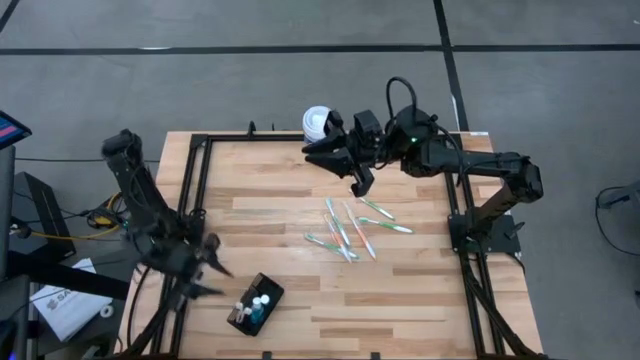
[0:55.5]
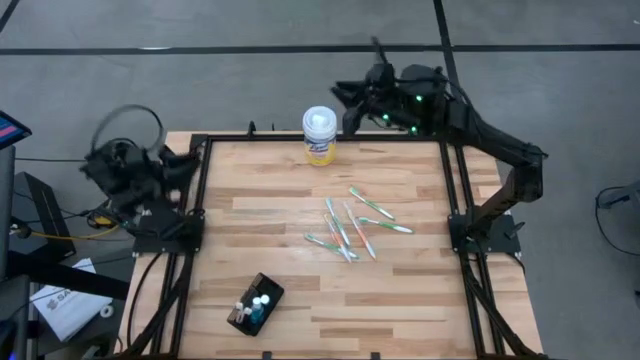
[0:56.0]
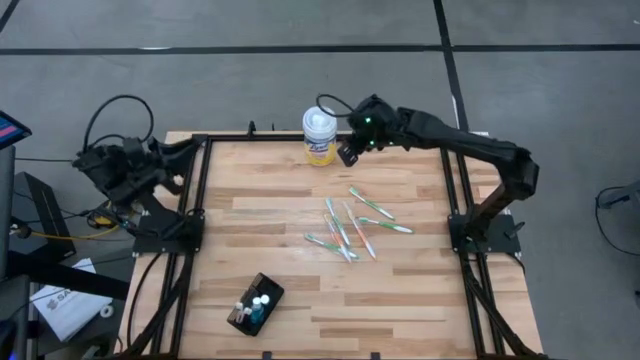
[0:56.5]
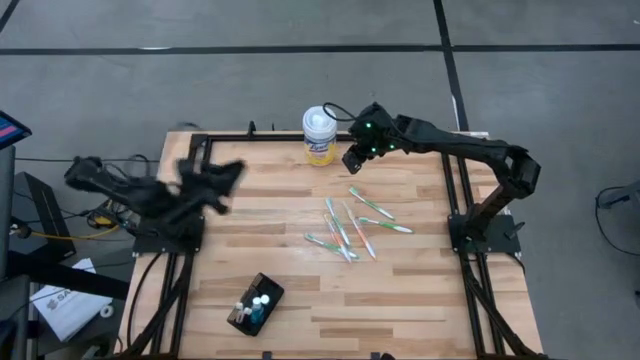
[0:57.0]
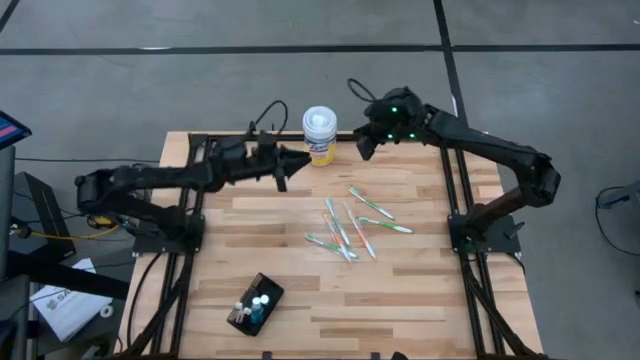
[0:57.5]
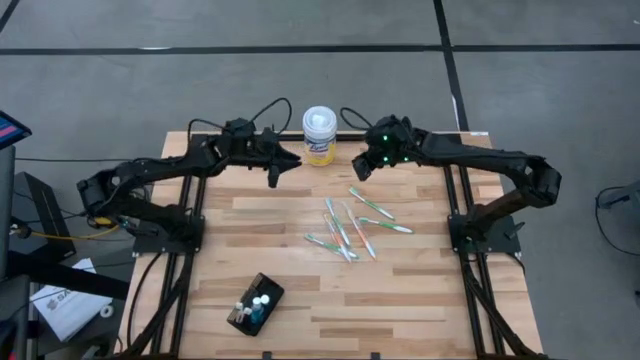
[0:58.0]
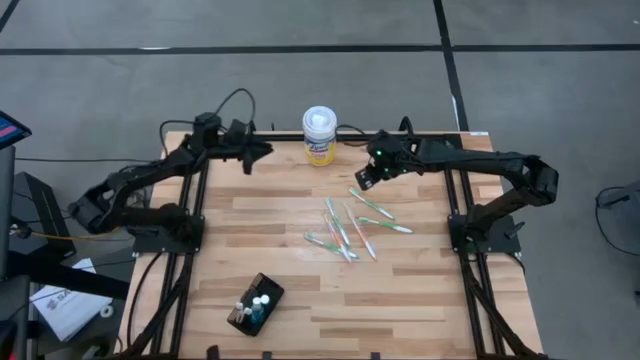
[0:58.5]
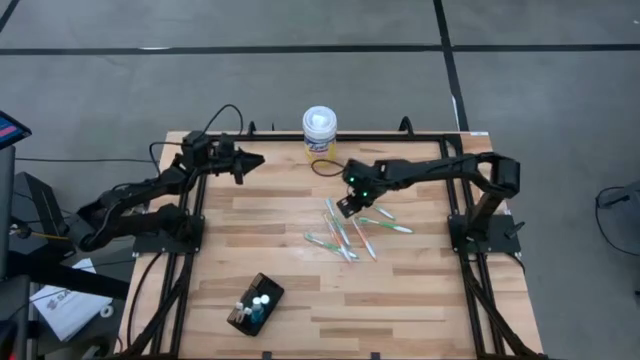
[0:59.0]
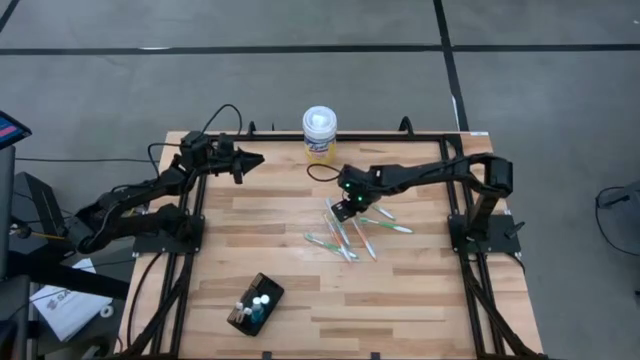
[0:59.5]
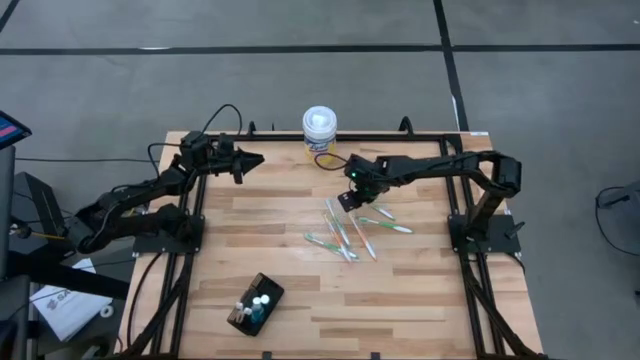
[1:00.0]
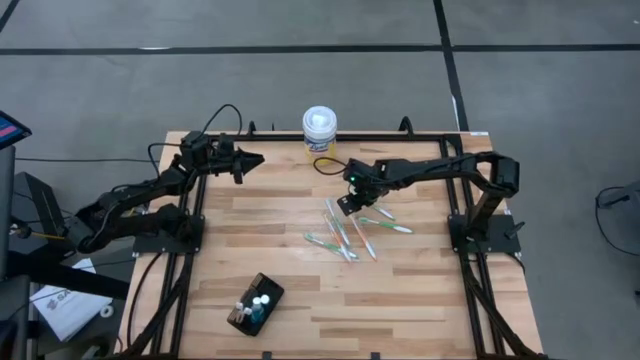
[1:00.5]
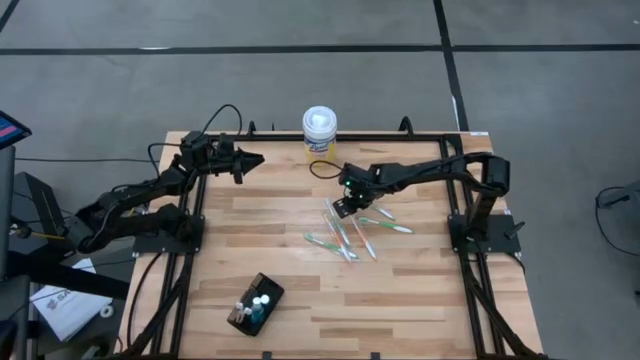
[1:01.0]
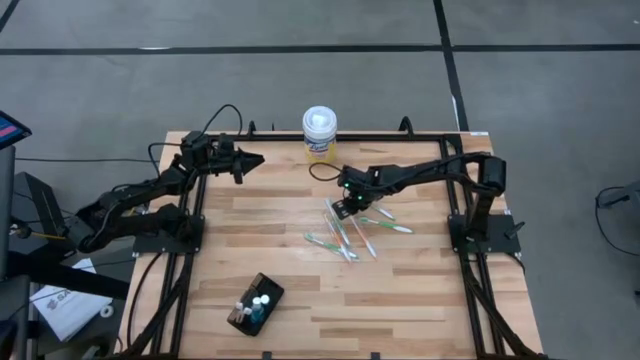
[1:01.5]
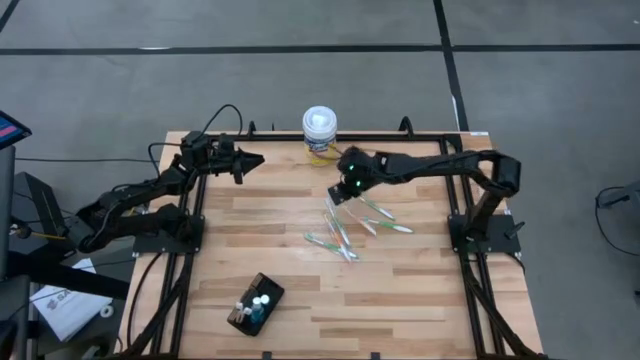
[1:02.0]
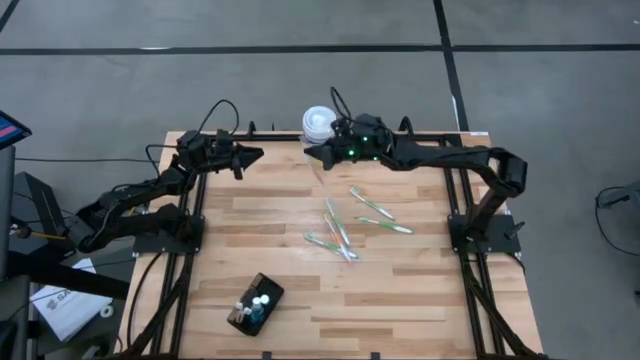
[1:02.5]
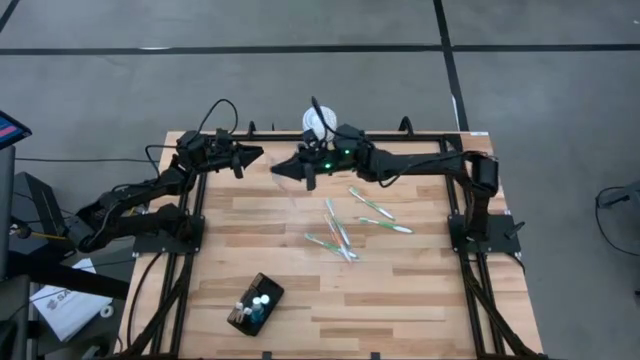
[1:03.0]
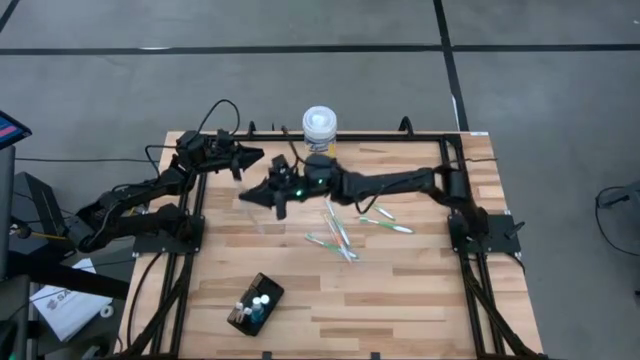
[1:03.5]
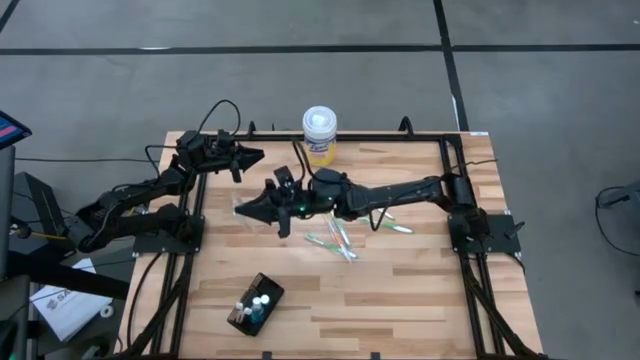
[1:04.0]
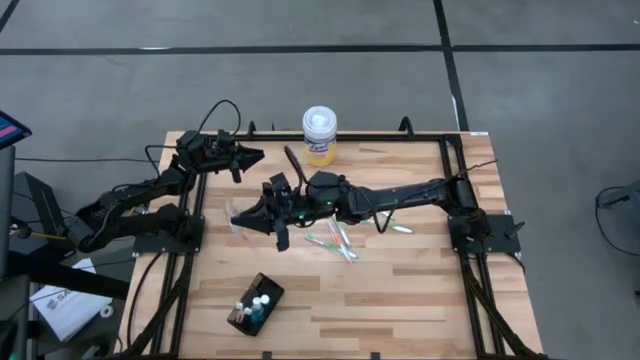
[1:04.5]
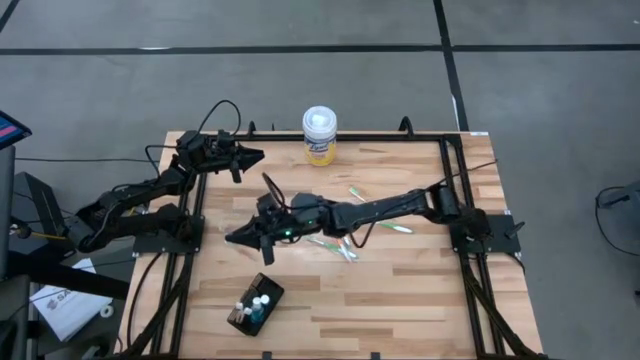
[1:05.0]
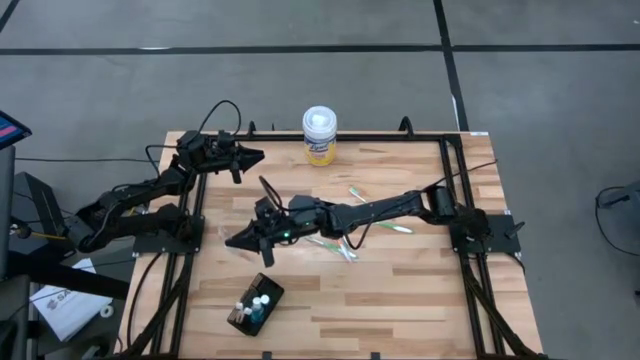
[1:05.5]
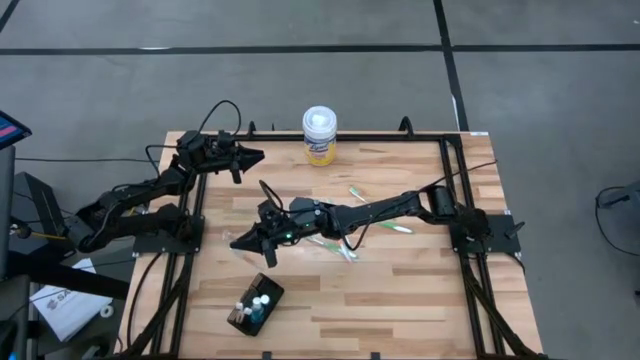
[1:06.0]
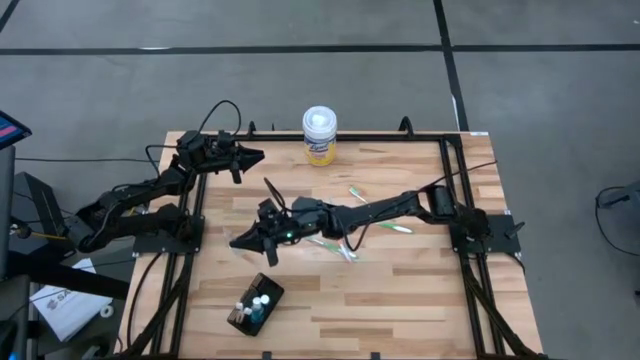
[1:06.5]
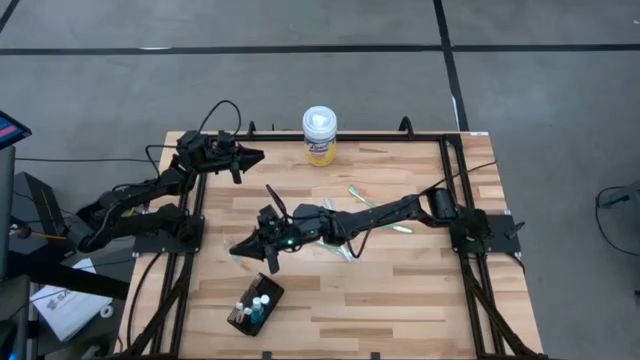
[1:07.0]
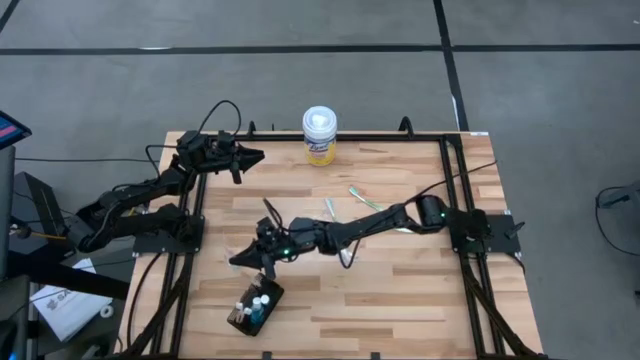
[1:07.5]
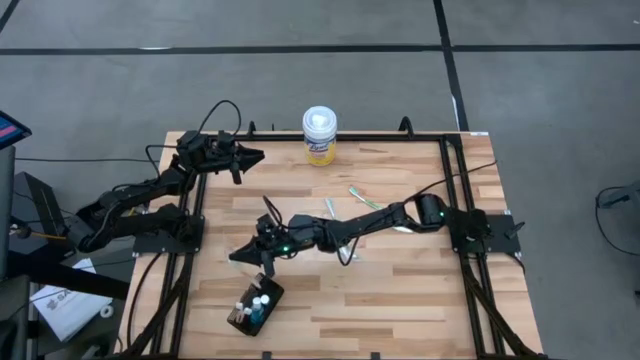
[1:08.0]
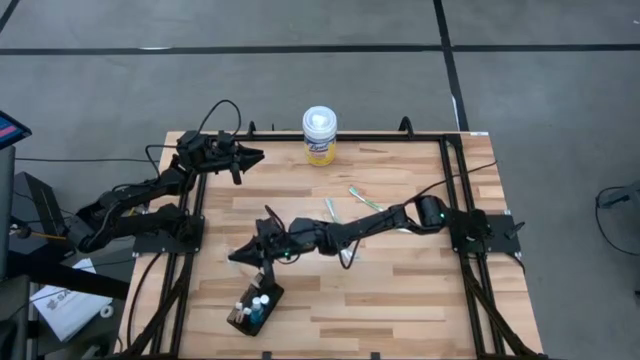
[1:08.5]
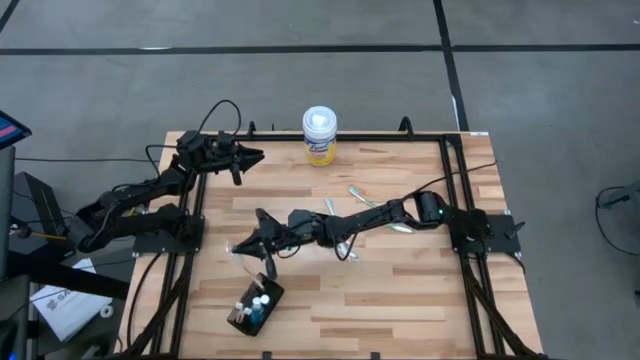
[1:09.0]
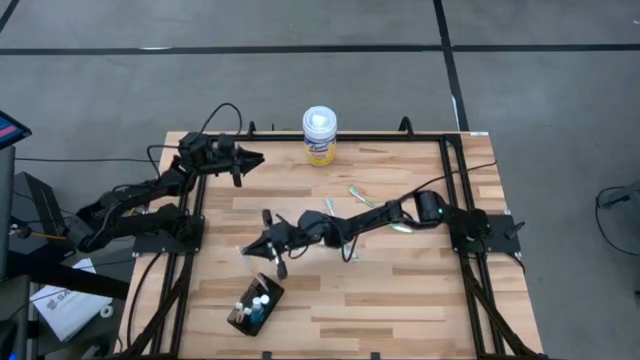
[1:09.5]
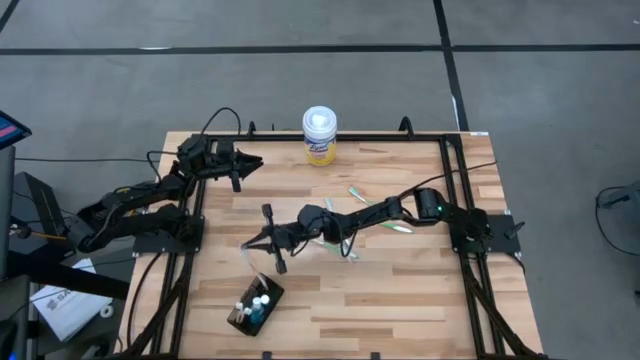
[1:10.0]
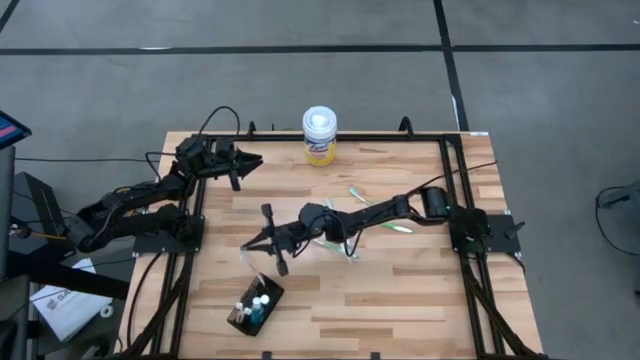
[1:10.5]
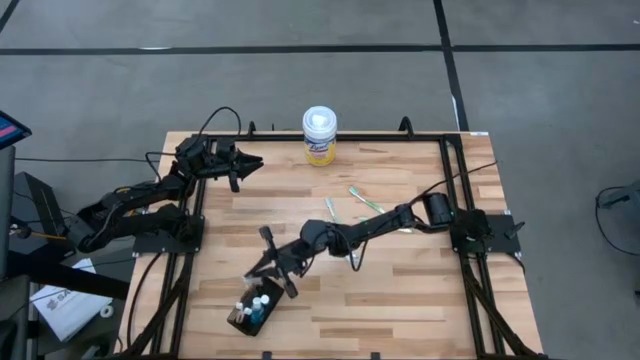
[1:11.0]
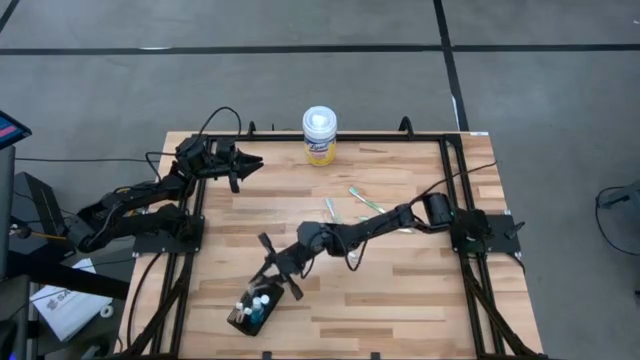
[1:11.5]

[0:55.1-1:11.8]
Task: Pick & Place toothbrushing station
Put the orange toothbrush into the black wire organizer bin

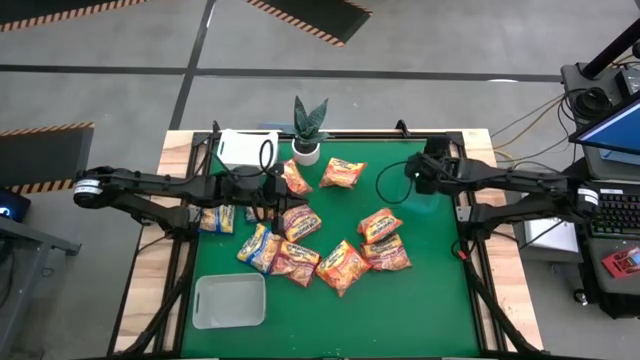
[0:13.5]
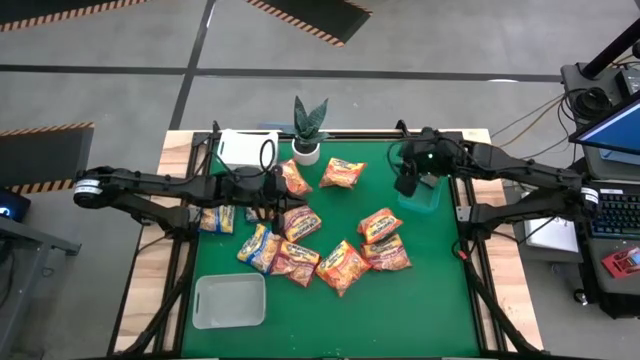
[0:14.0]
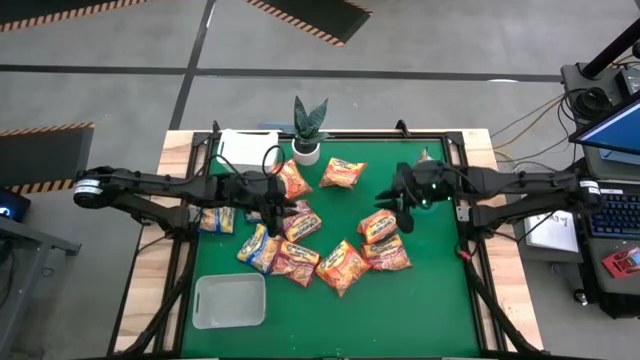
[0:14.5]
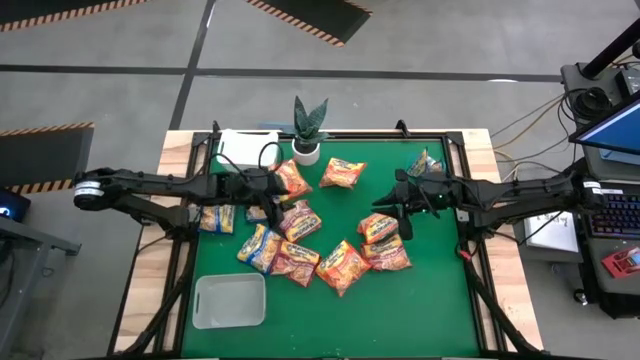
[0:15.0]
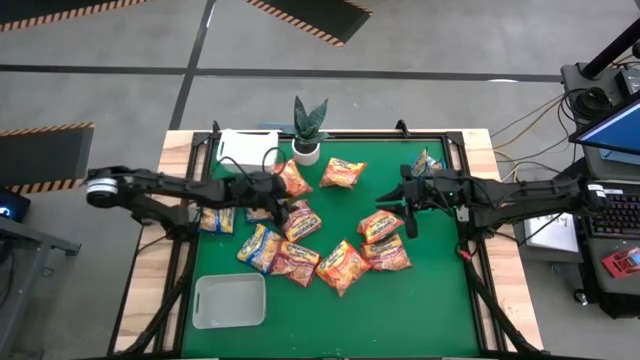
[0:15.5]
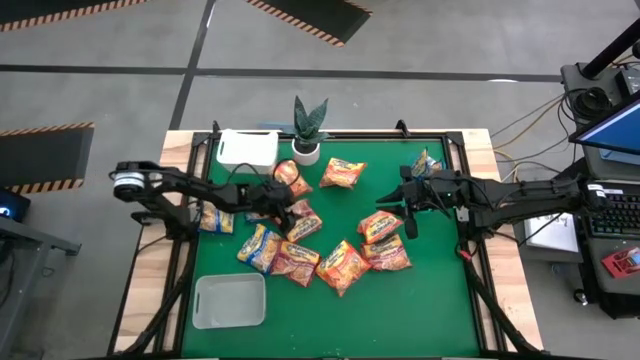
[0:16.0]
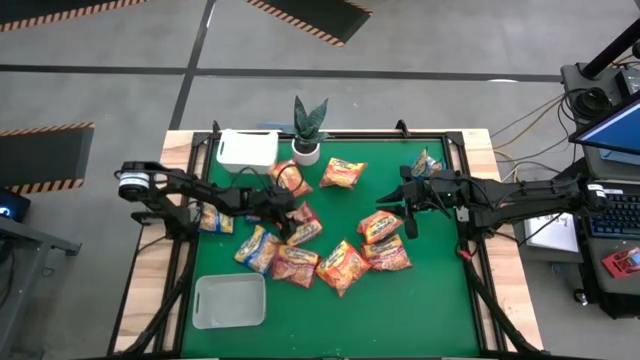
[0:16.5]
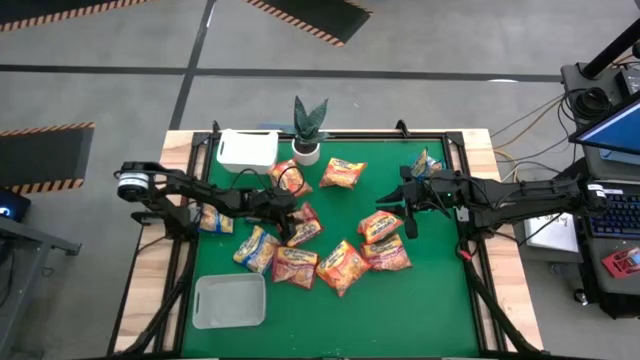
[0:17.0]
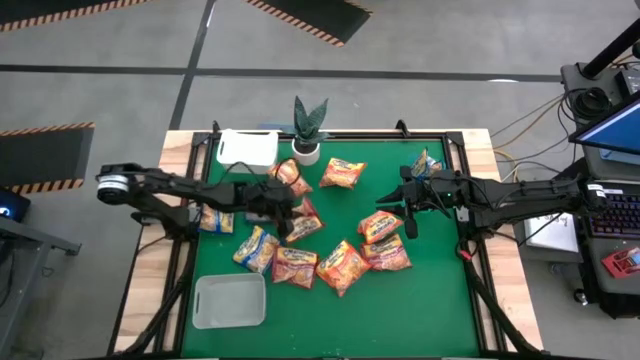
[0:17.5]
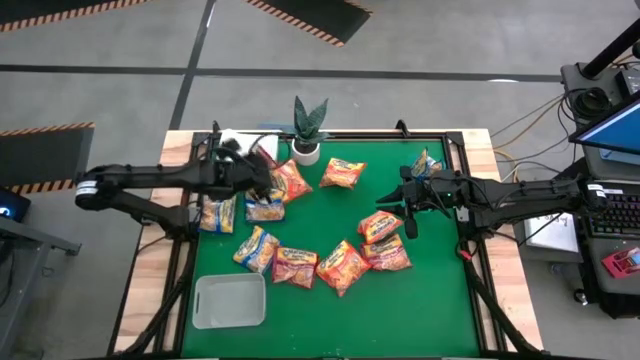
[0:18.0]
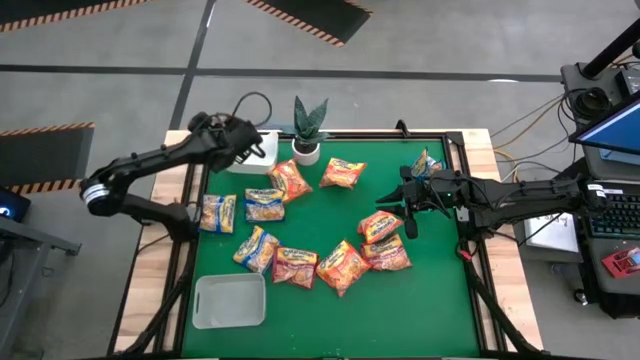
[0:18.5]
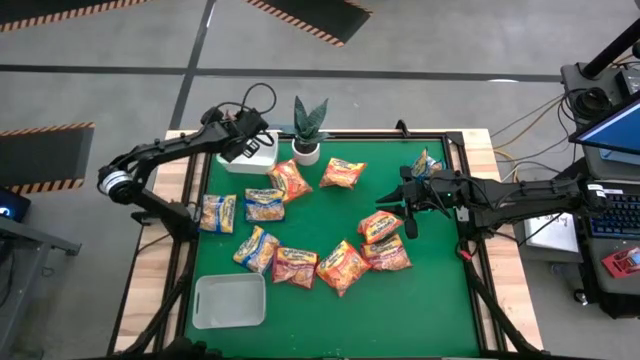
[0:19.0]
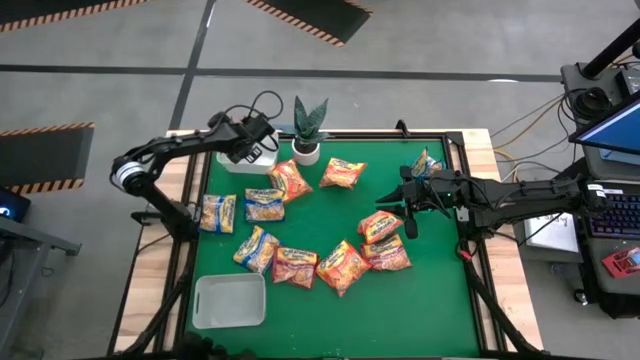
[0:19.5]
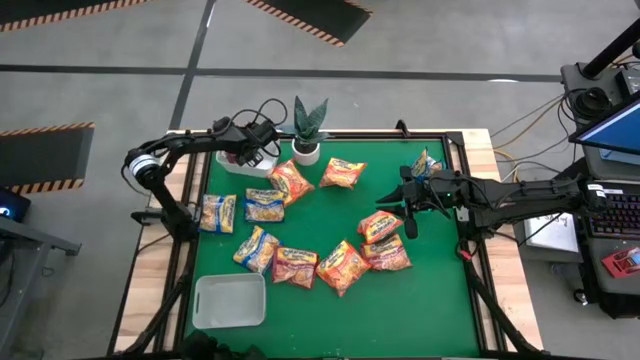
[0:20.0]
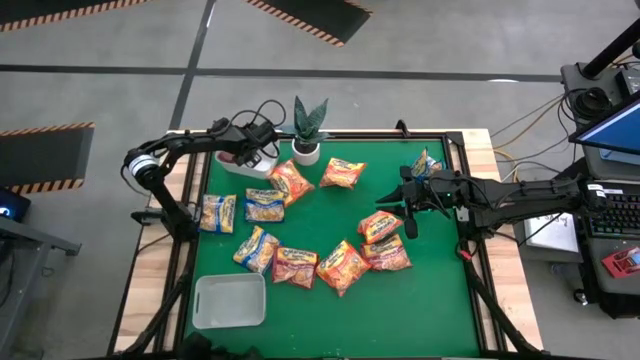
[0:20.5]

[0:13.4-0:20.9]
Task: Sort Maruchan noodles
Put the red noodle pack into the white bin
